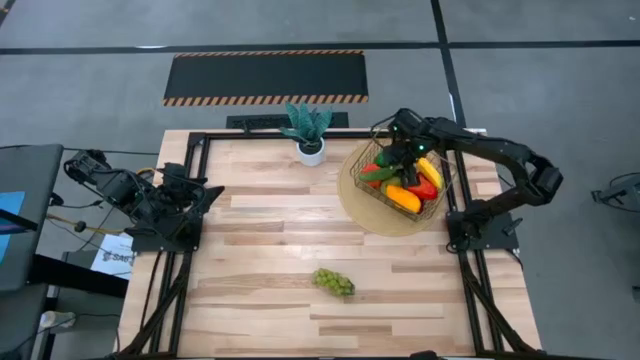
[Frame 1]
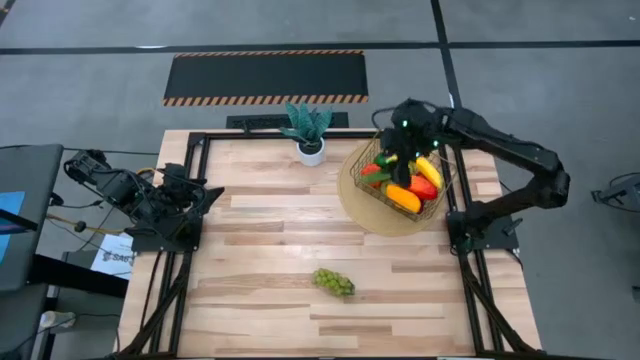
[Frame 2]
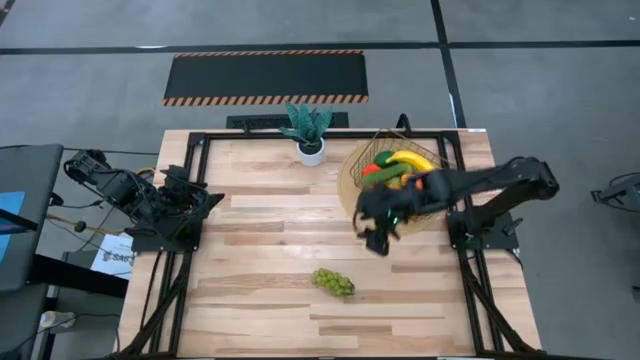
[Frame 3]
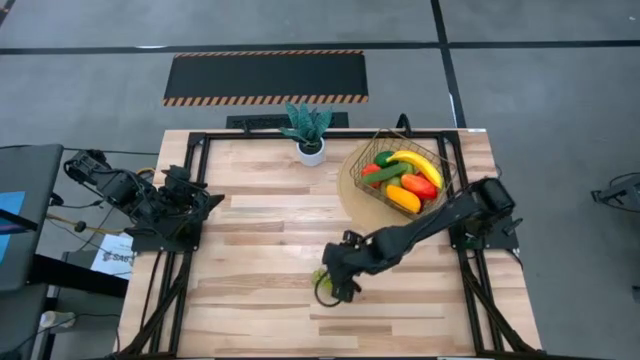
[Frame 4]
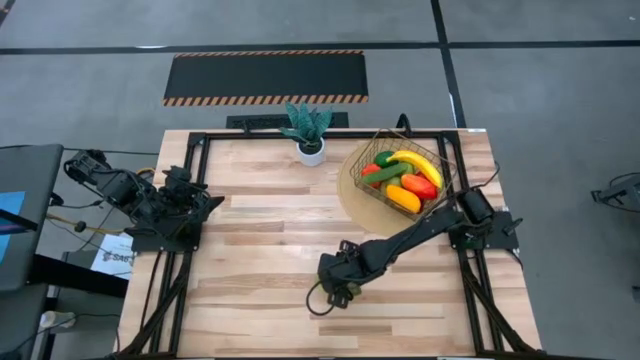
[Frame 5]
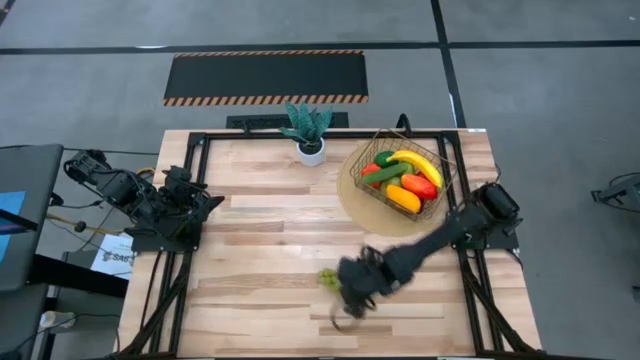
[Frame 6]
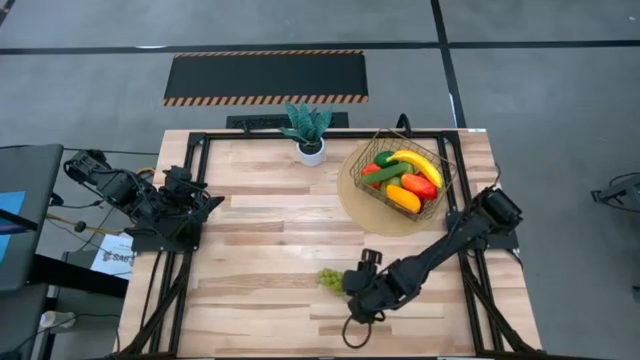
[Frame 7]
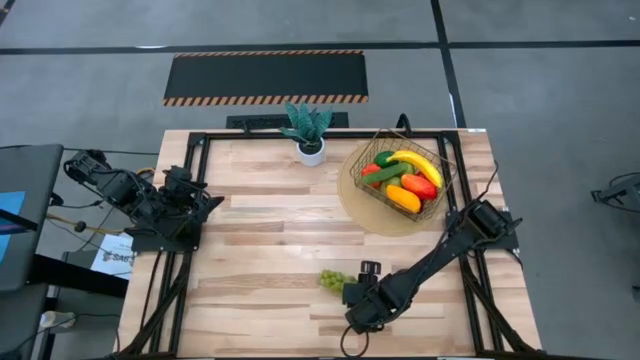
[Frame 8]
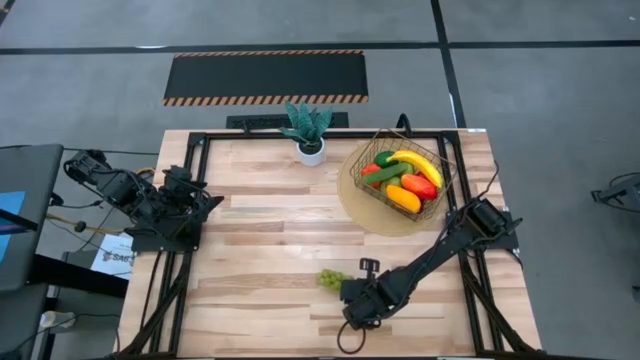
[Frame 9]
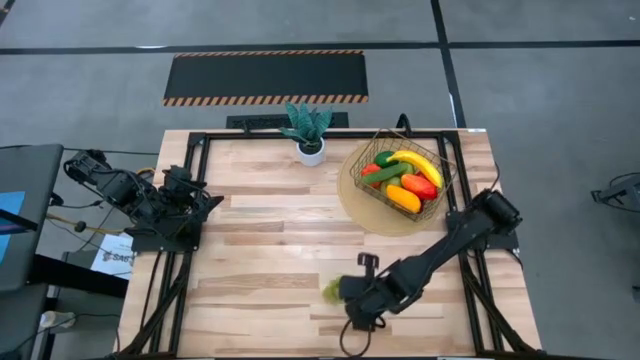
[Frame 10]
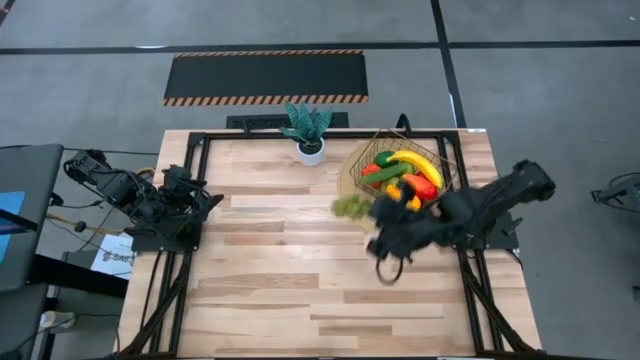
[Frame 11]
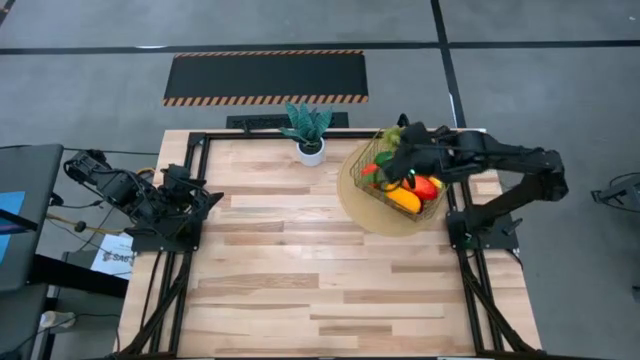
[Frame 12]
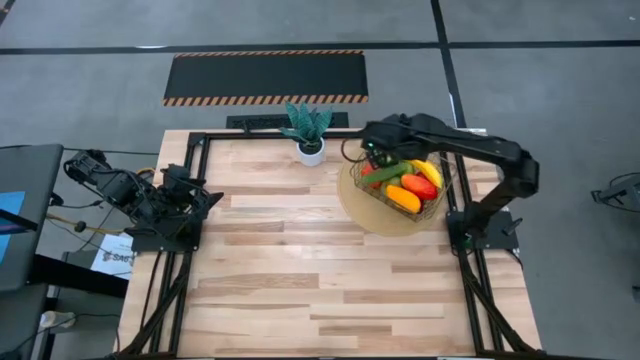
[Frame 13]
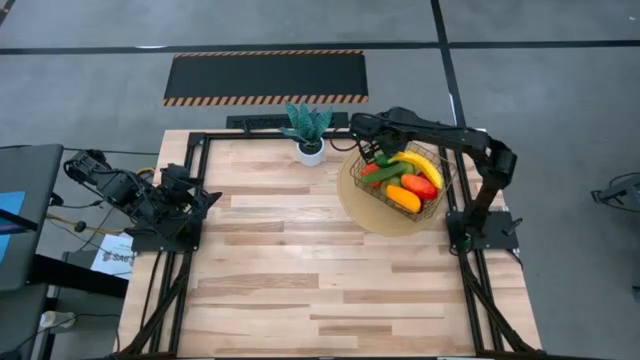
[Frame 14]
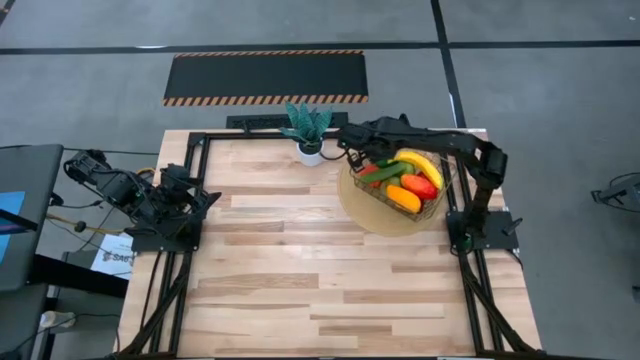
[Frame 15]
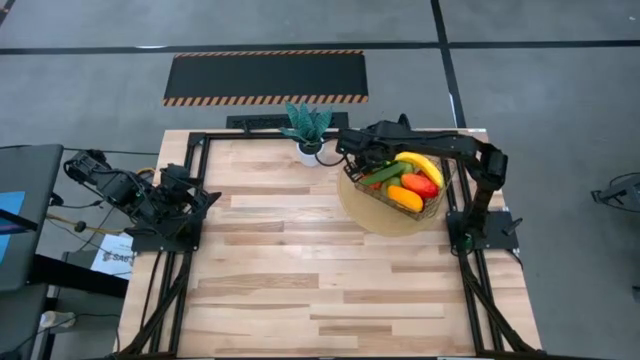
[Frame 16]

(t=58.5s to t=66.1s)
Task: Build produce basket
Put the green grapes into the wire basket

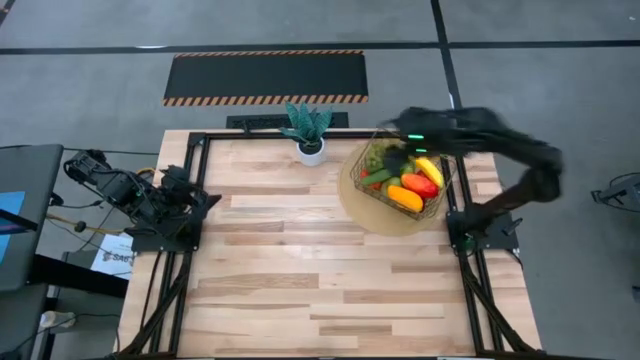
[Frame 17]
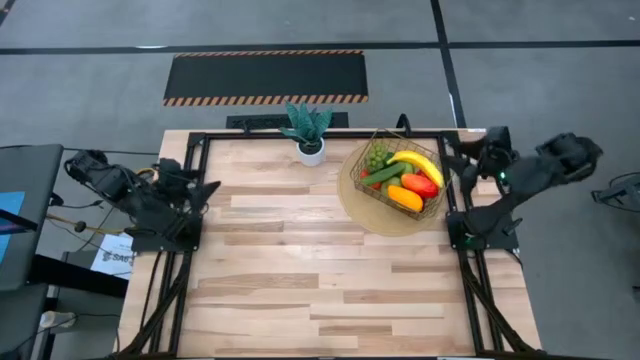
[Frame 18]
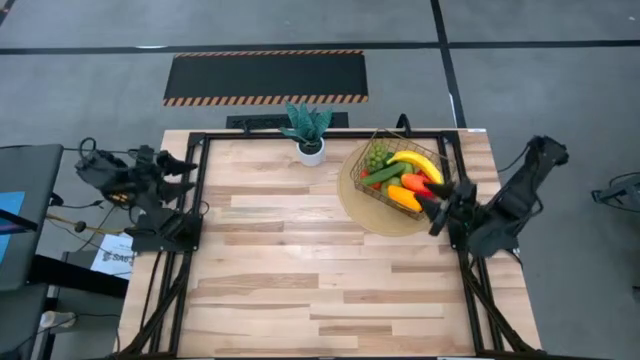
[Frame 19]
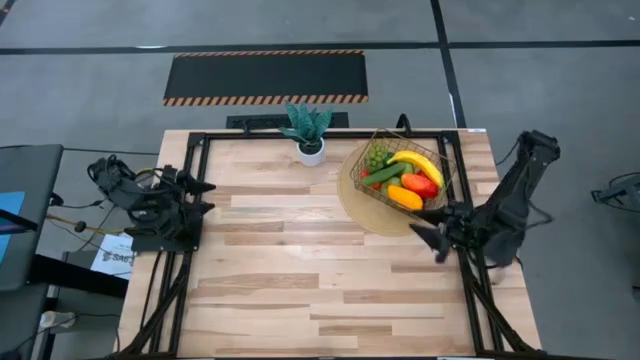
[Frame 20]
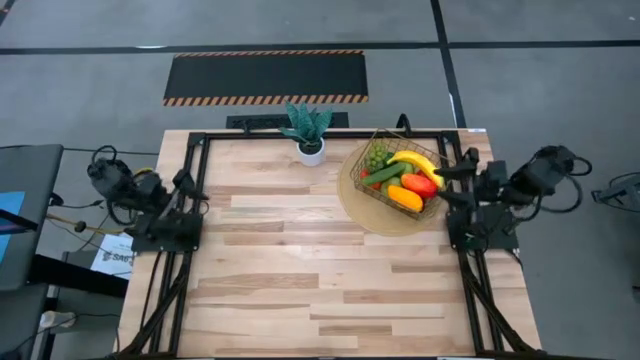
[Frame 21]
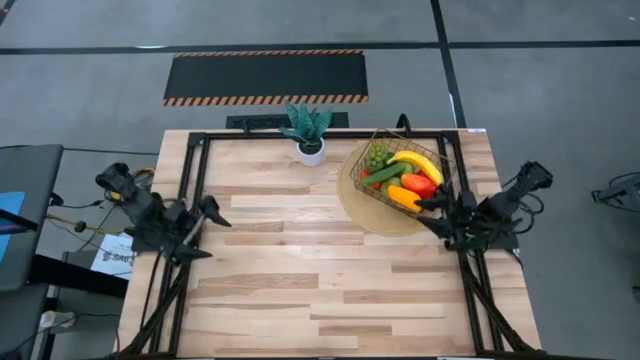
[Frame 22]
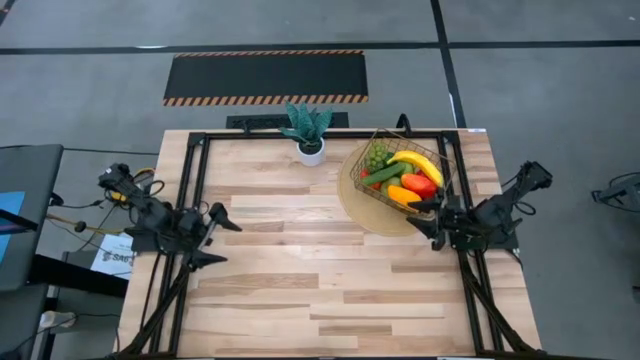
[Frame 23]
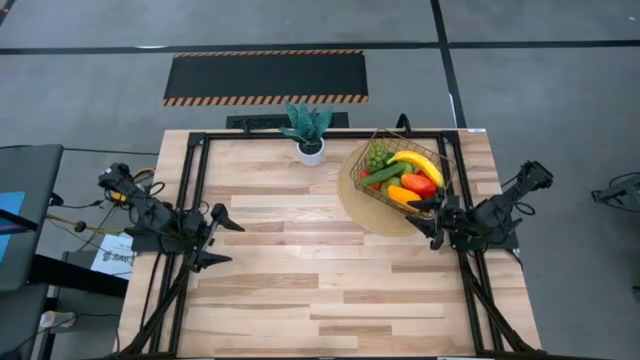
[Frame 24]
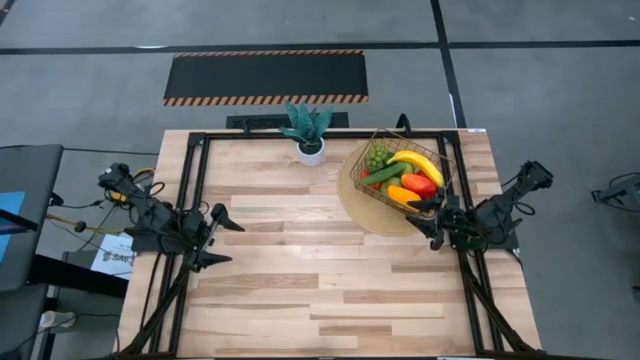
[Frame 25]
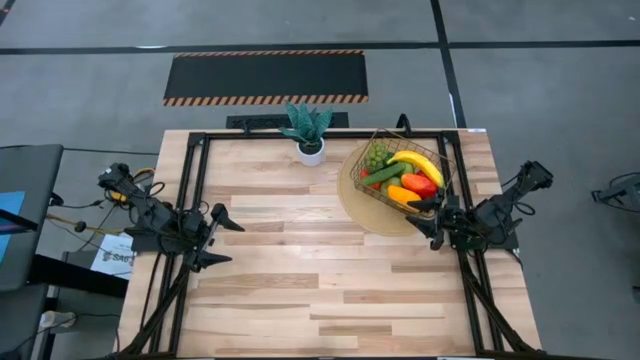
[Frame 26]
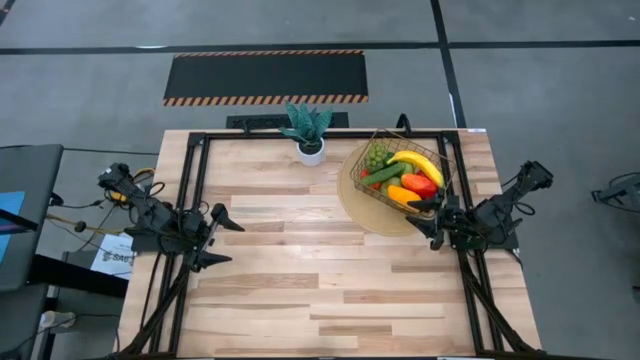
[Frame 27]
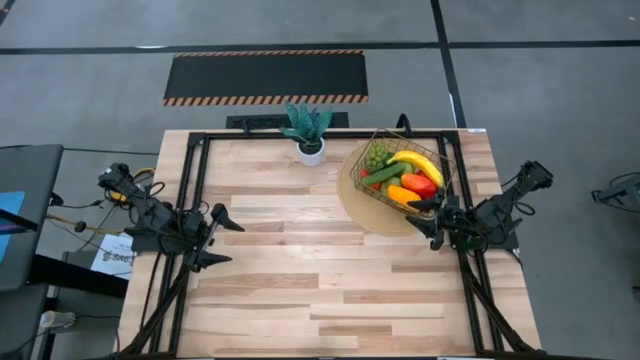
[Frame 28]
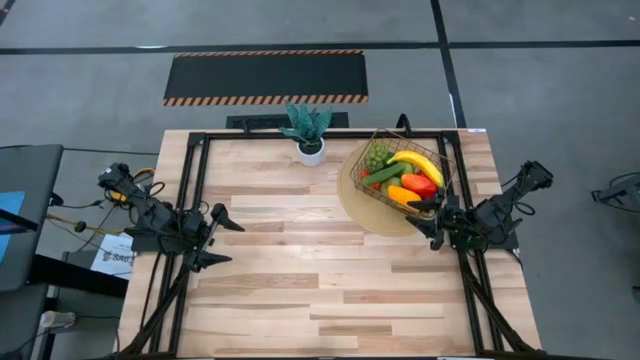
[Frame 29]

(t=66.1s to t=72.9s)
Return to Home Position

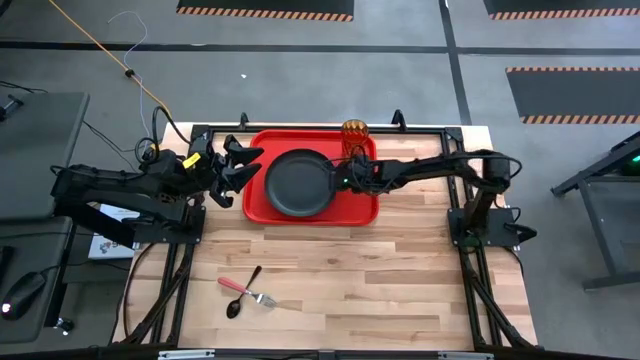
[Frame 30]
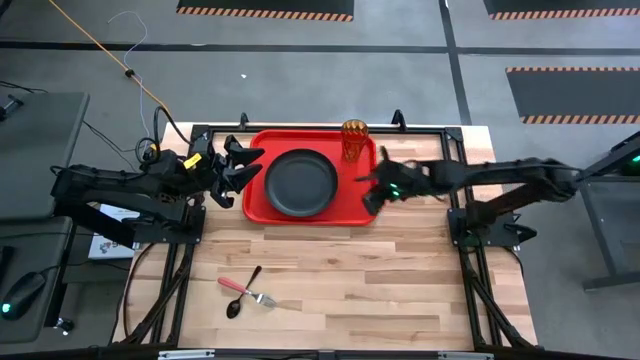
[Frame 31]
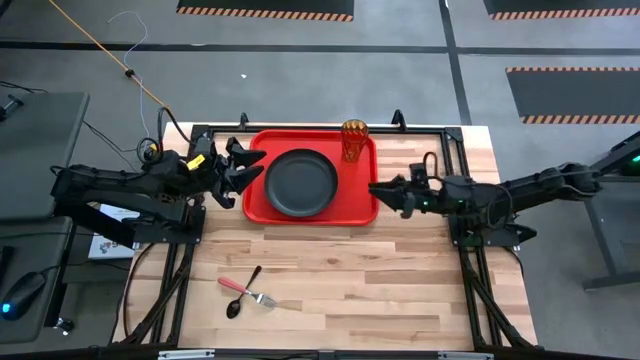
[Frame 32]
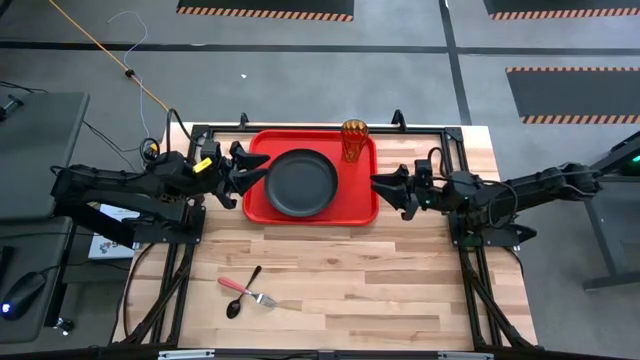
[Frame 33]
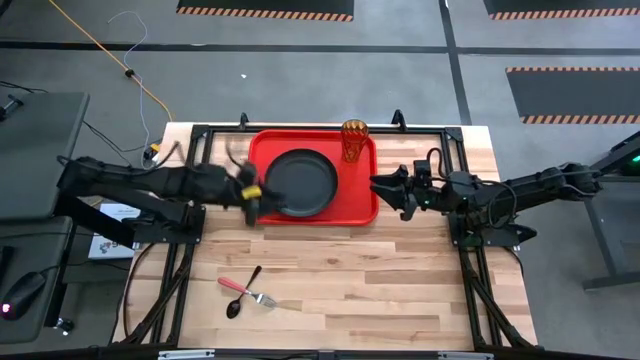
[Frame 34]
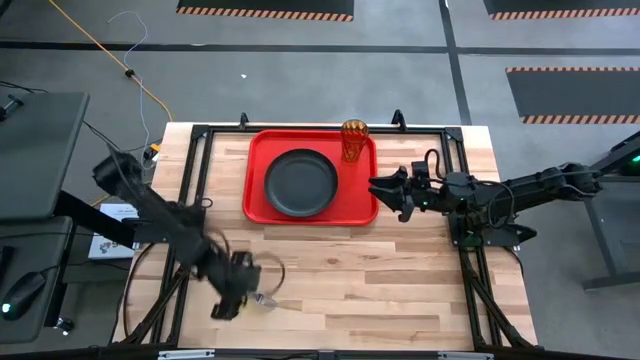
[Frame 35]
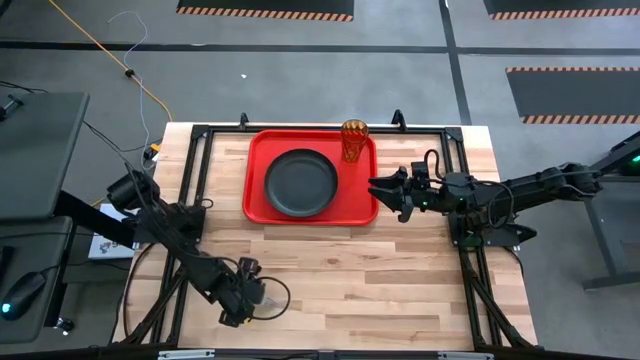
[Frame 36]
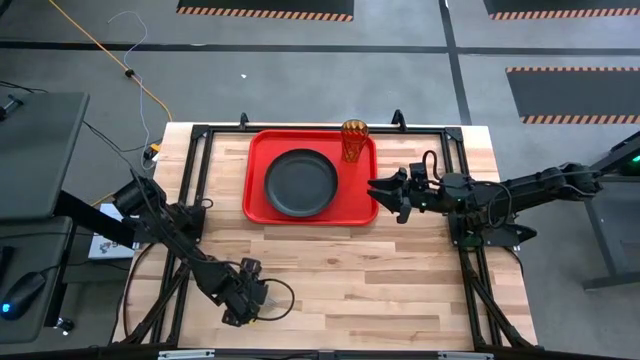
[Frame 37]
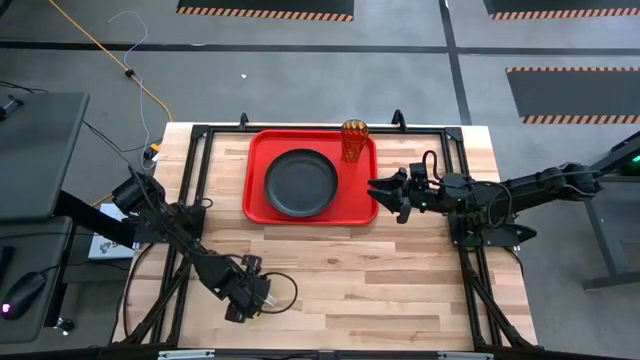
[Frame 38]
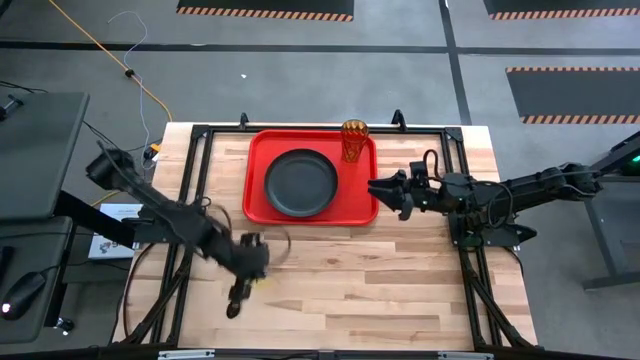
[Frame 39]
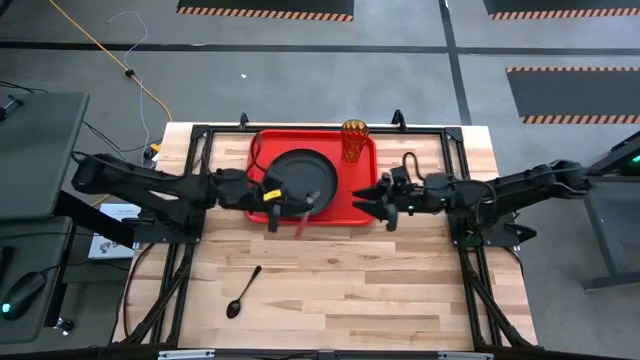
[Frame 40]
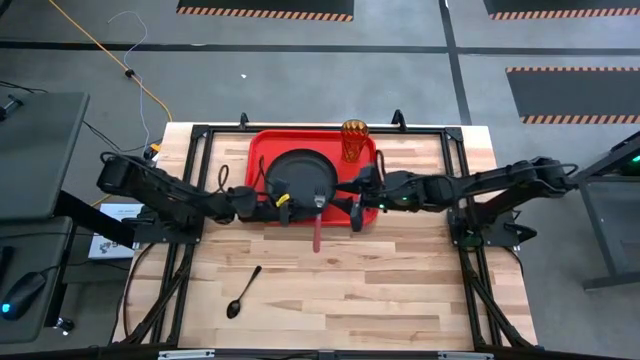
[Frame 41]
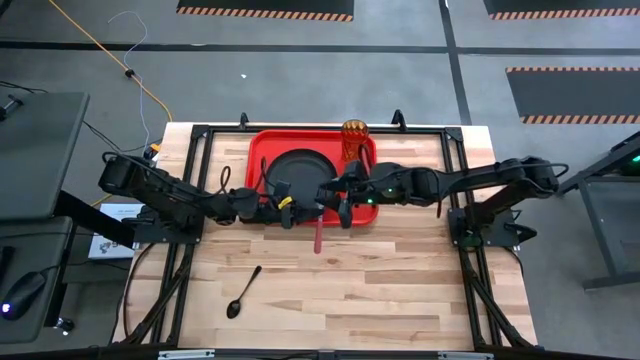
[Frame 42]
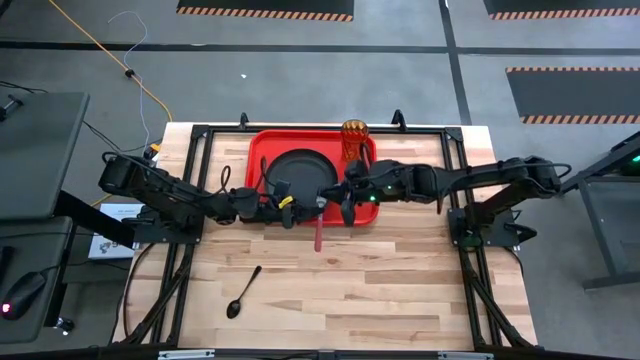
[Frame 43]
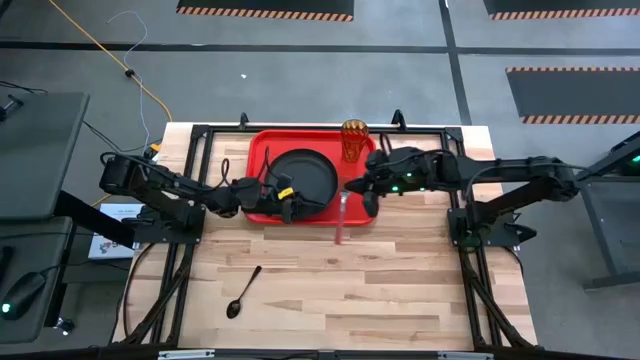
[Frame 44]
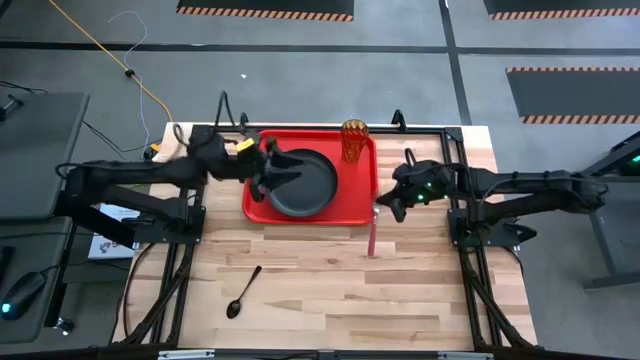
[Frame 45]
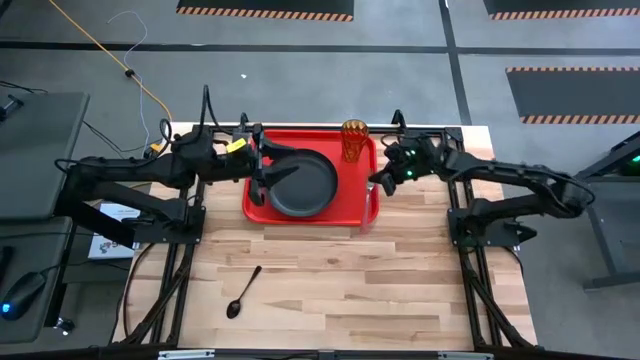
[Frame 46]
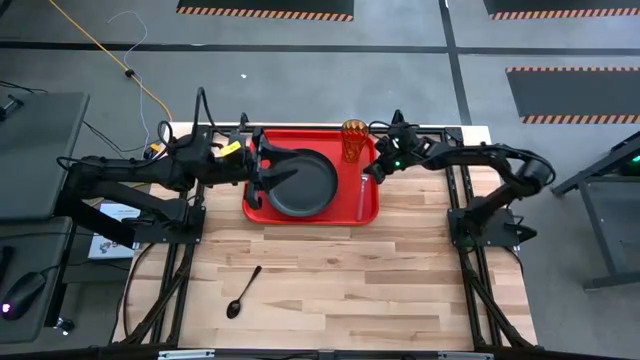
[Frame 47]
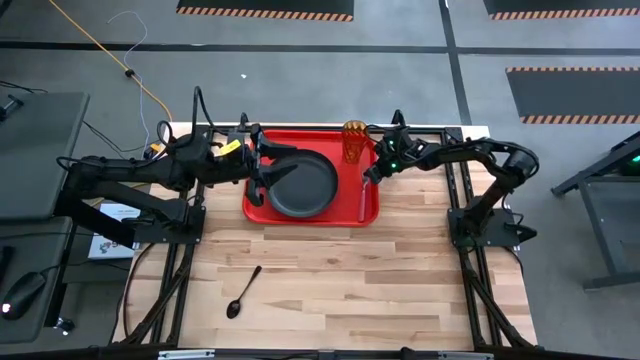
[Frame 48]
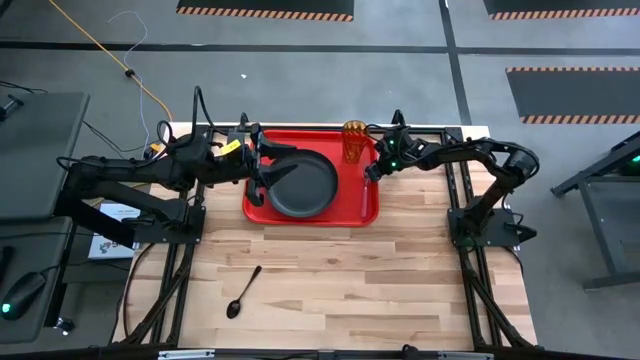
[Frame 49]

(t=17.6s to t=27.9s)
Task: Pick and place plate/cup/fork/spoon on tray
Put the pink fork on the red serving tray to the right of the black plate
